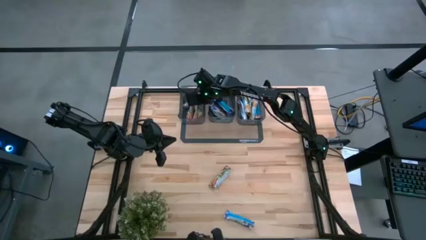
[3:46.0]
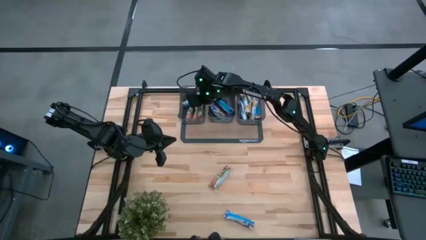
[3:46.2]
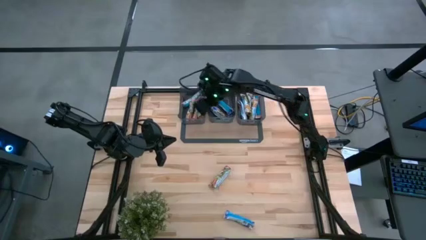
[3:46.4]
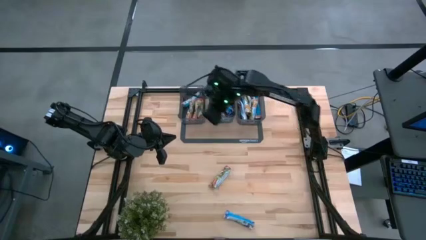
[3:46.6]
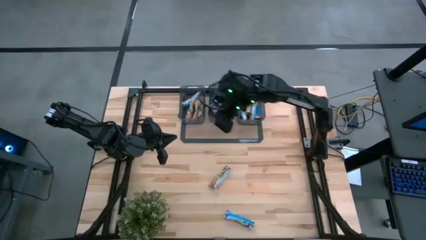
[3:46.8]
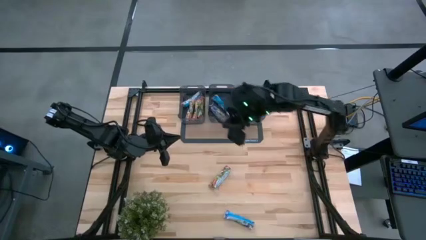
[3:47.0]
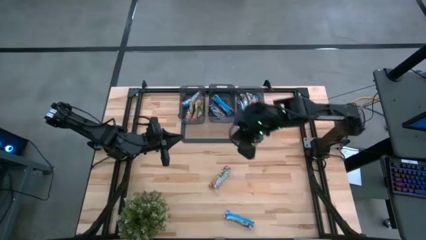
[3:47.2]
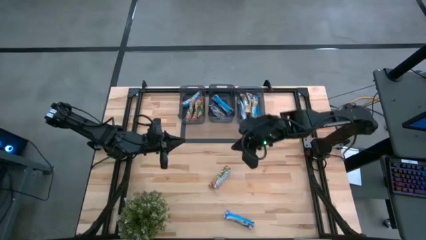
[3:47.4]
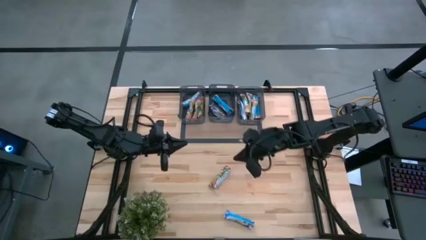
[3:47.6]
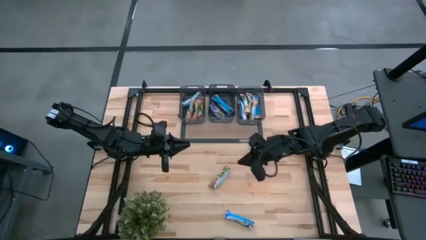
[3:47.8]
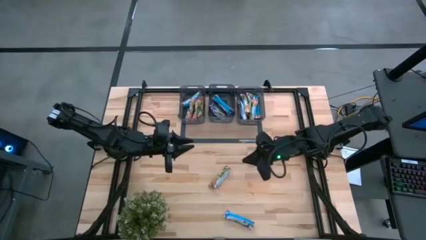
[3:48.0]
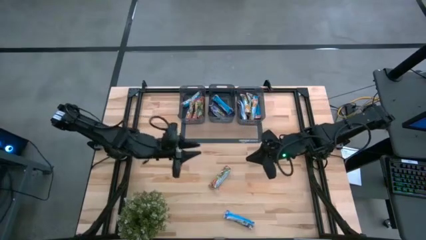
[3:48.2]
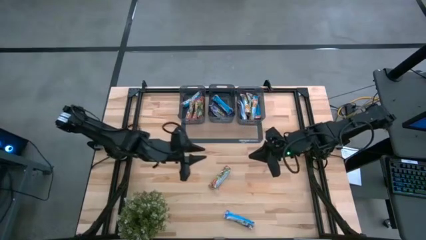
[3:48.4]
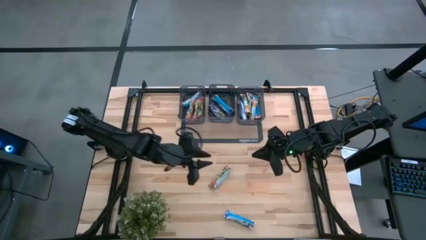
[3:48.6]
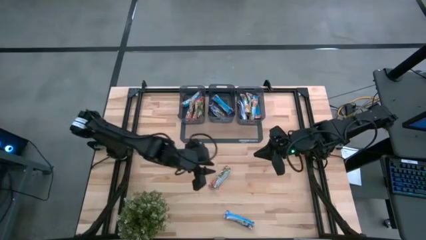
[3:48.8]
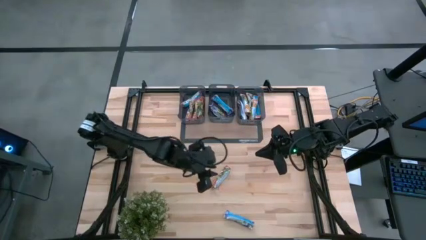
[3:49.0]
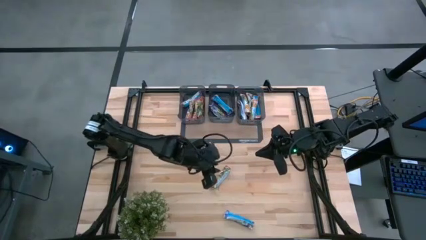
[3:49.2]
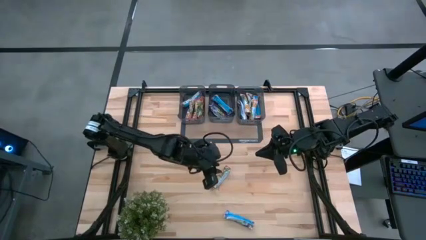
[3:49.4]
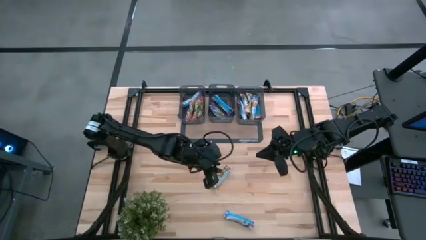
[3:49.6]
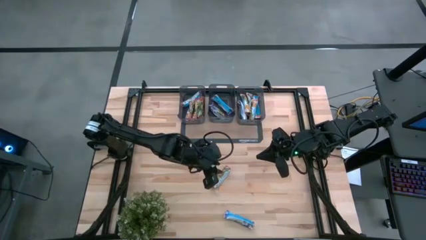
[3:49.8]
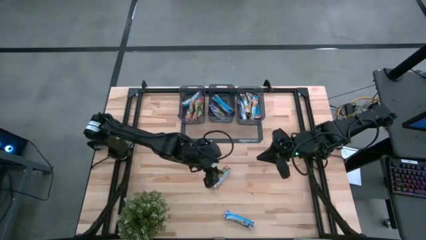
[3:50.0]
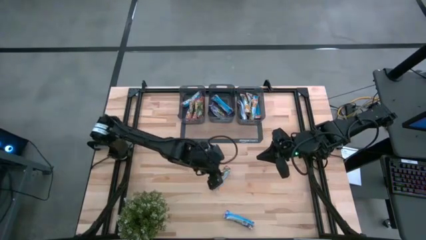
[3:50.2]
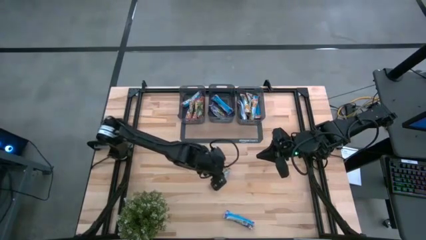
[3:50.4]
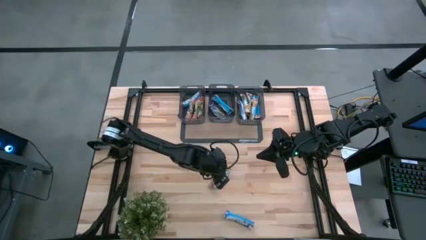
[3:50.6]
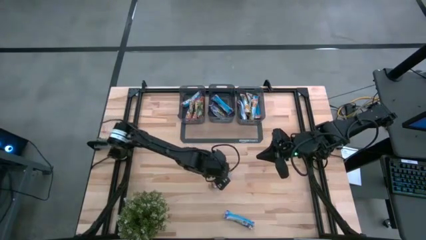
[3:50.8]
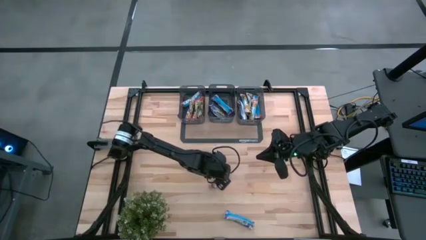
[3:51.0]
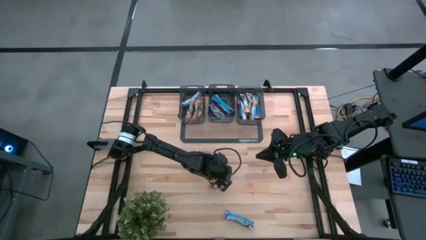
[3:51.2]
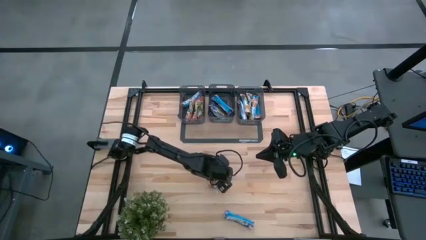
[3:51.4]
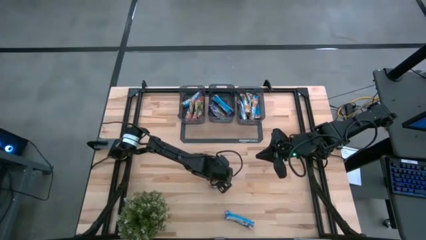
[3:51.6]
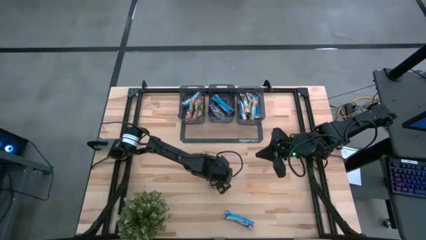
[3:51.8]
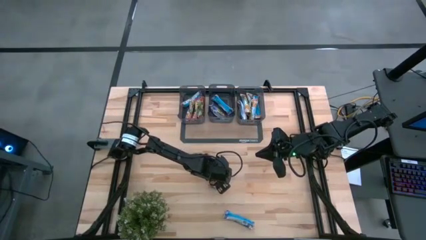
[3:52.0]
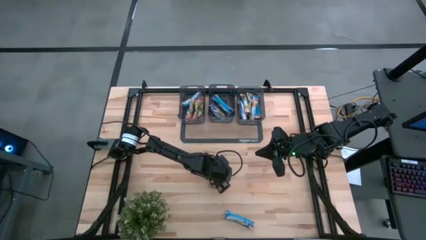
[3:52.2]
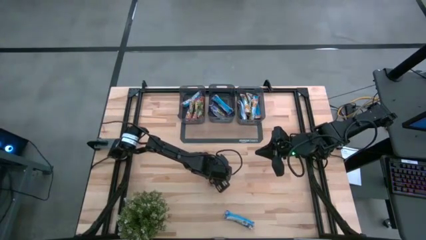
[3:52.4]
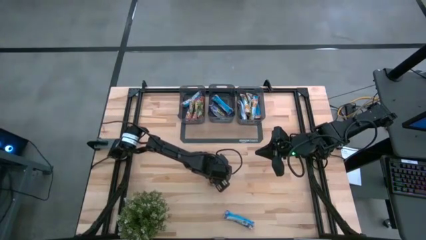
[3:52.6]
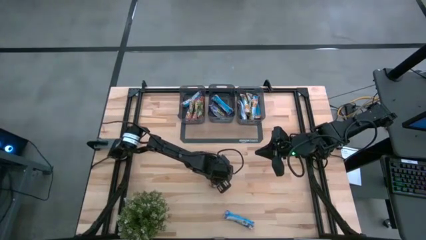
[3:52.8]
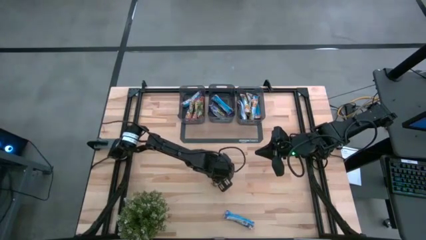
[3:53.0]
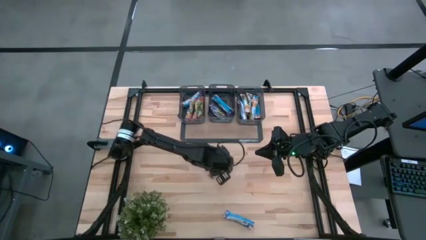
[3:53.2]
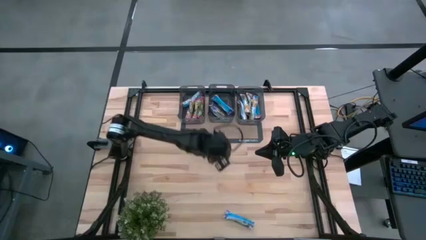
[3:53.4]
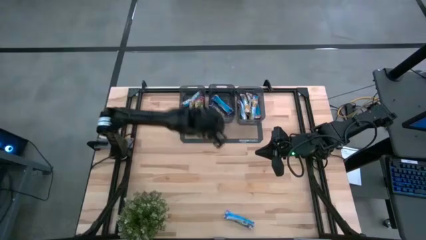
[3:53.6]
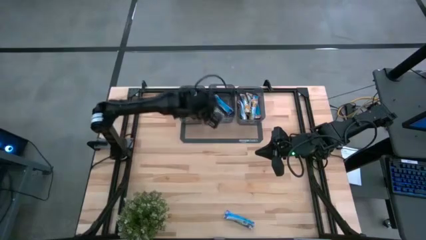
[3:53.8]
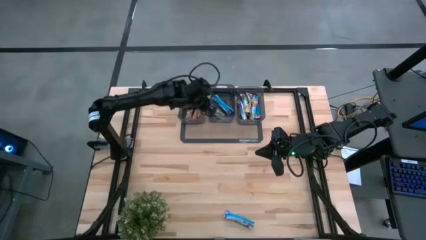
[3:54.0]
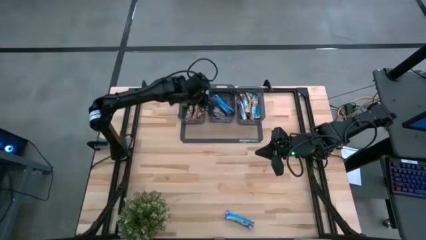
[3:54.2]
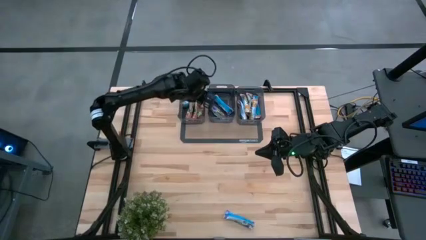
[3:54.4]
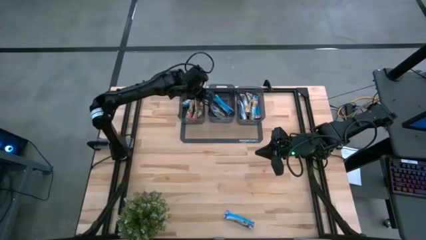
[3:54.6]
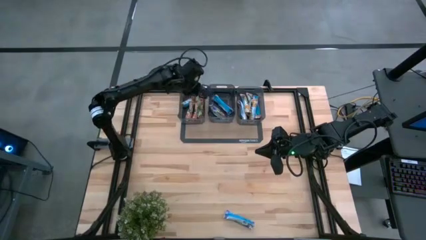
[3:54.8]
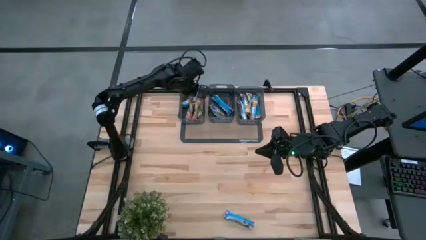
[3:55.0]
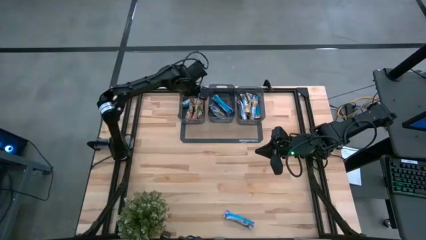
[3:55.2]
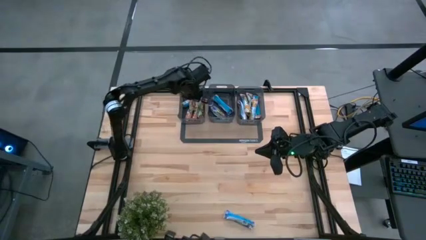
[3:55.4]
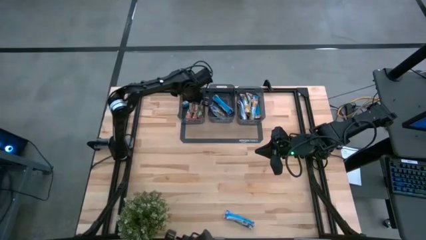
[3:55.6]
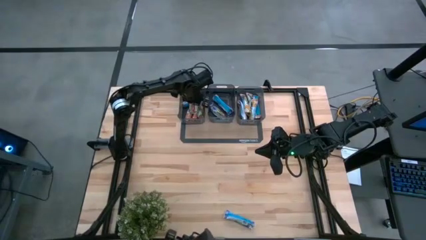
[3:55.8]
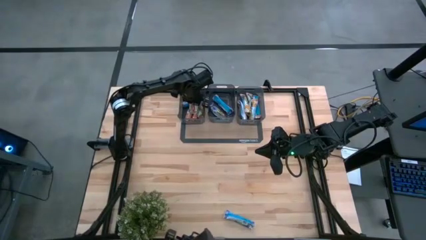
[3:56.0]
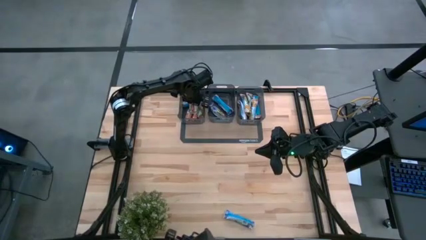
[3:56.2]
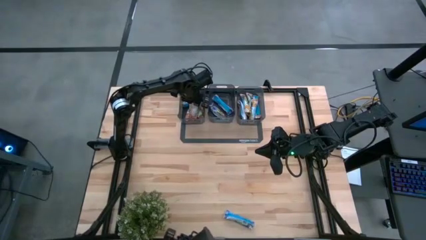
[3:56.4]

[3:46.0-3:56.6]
Task: Pick and place Granola Bars by type
Put the red granola bar into the left black bin

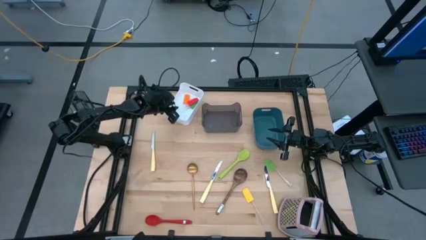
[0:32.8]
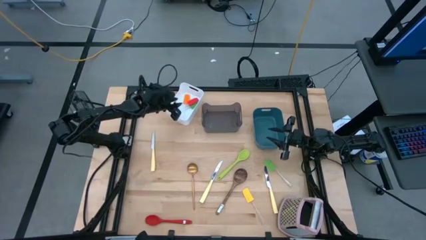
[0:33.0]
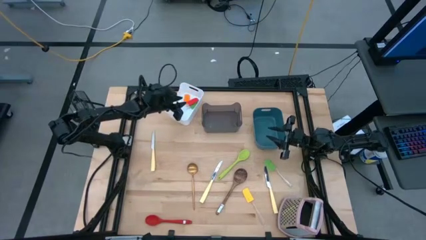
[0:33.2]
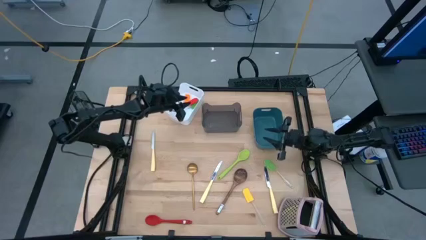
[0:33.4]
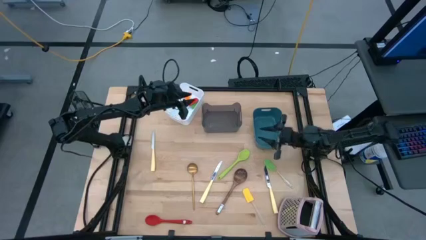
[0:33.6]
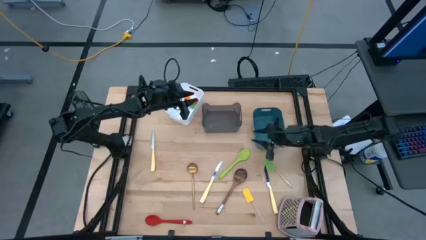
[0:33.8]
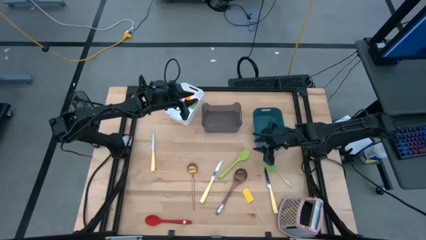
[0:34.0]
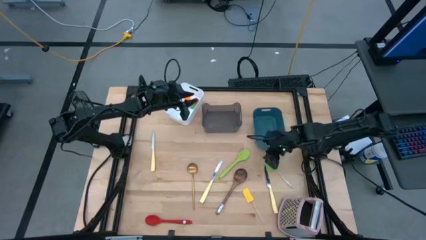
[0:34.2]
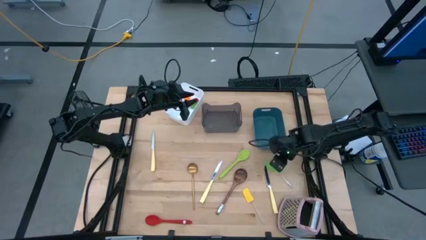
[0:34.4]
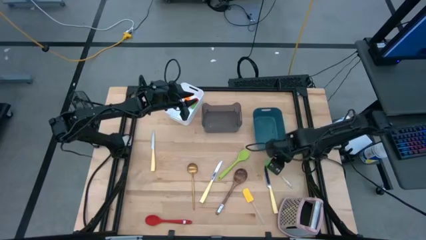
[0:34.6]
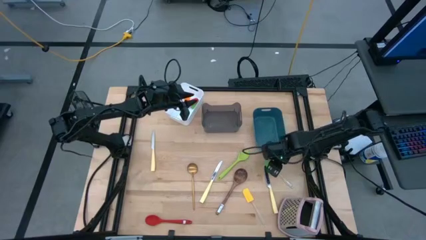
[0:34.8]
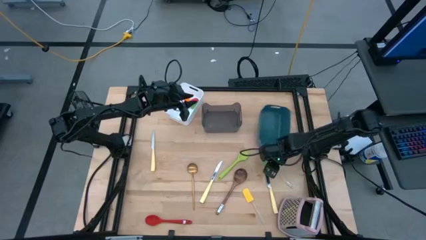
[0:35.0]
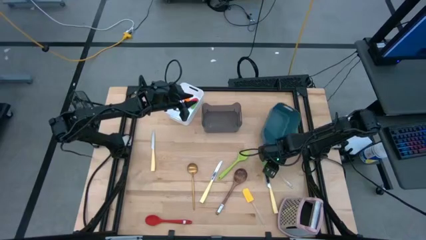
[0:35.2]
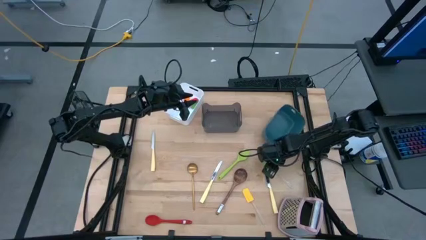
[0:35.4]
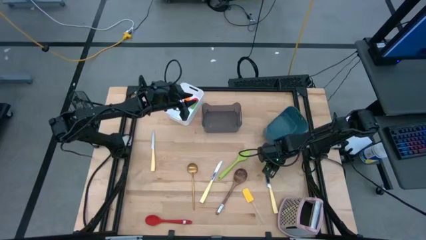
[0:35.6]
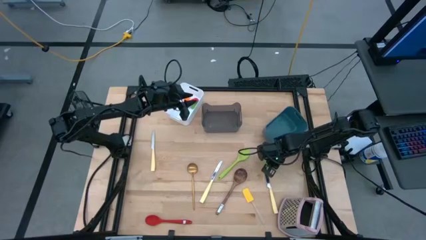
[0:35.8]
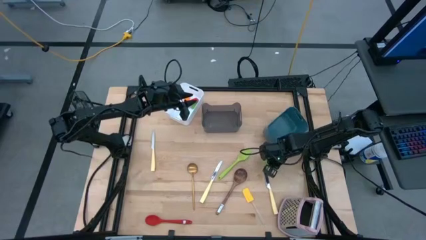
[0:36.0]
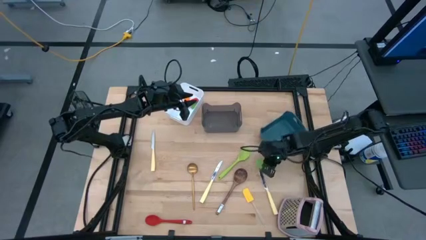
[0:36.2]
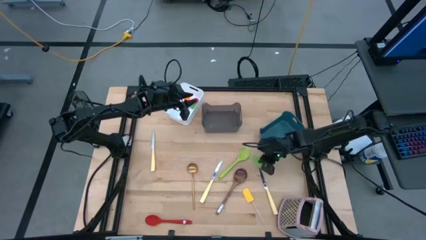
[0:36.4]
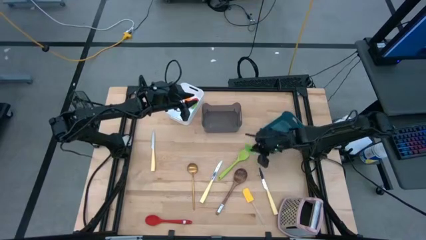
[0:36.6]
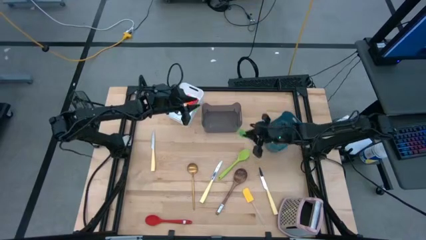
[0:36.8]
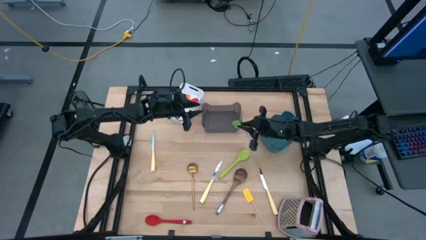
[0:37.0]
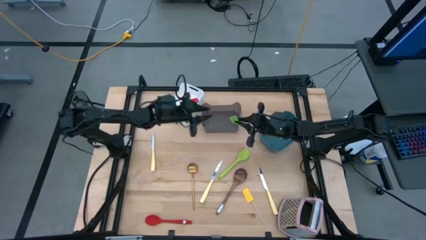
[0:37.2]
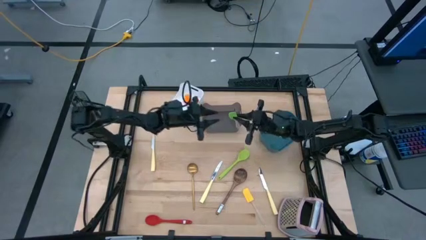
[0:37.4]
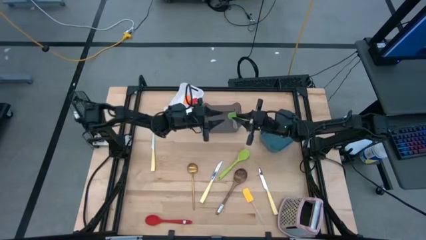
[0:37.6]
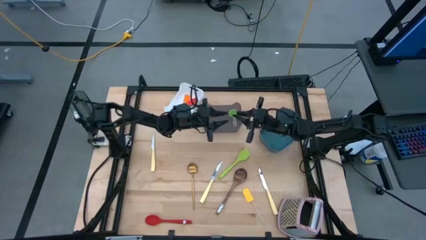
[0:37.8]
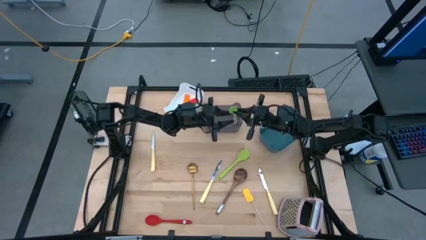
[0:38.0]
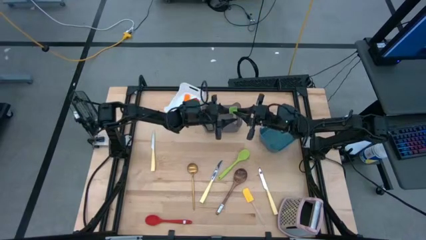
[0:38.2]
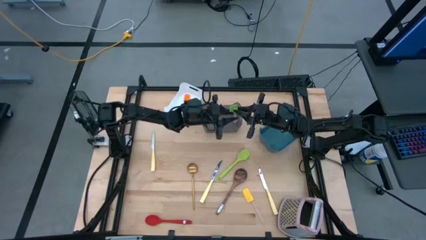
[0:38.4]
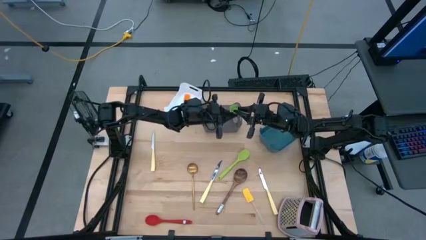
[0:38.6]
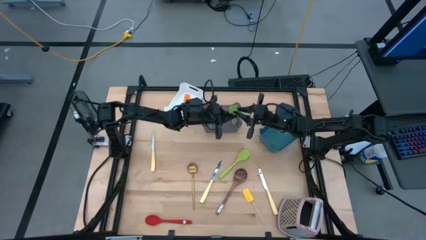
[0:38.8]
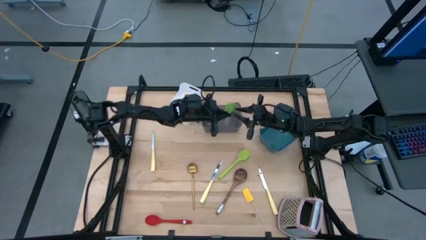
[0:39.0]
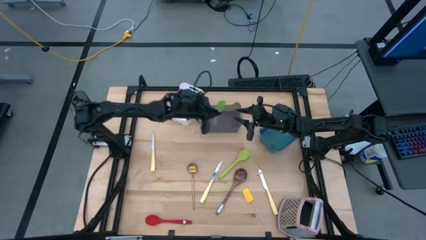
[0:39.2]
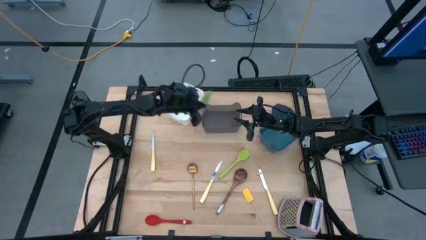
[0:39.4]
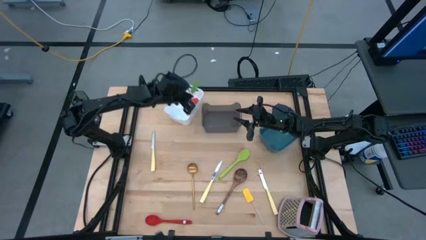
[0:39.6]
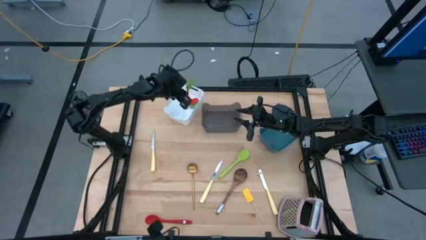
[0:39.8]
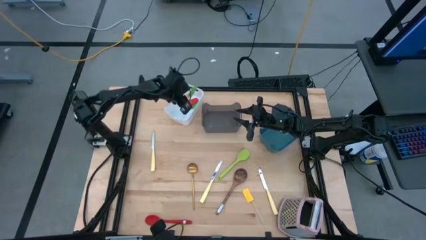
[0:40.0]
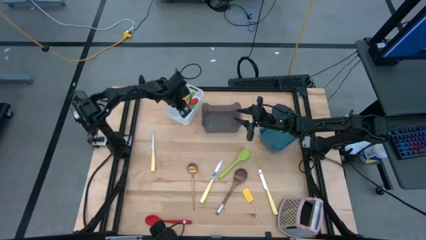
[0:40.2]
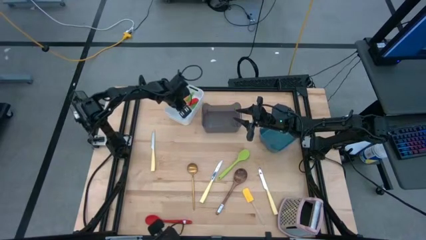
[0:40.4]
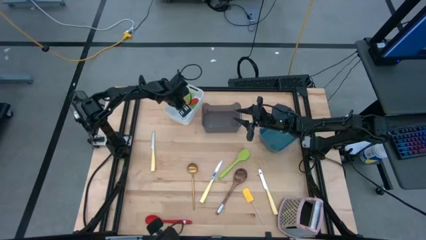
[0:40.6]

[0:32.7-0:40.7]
Task: Pick & Place Kitchen Items
Put the green spatula into the white bin
